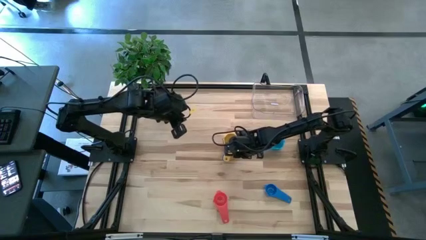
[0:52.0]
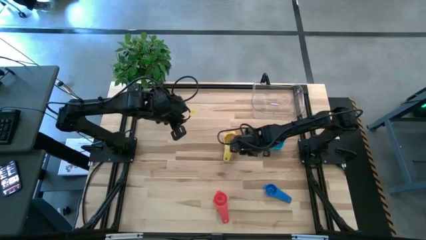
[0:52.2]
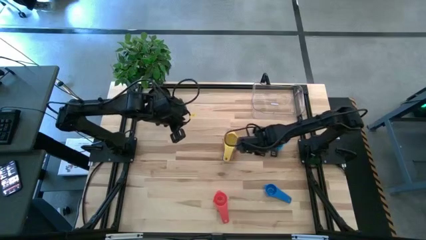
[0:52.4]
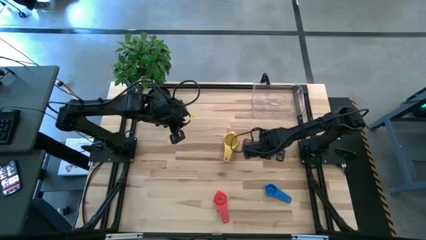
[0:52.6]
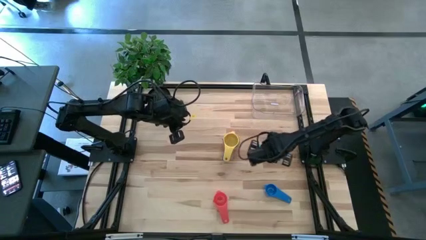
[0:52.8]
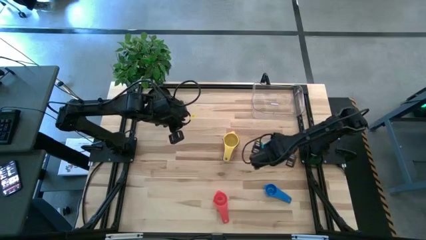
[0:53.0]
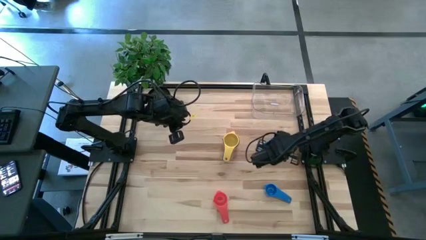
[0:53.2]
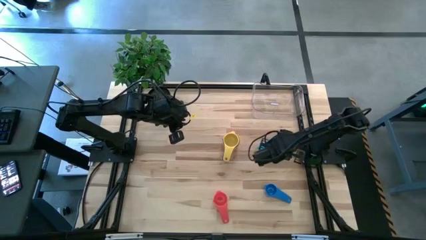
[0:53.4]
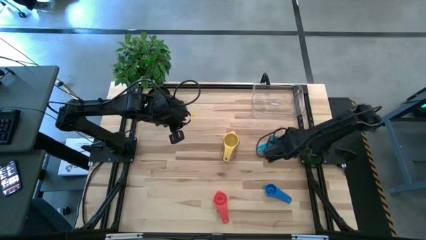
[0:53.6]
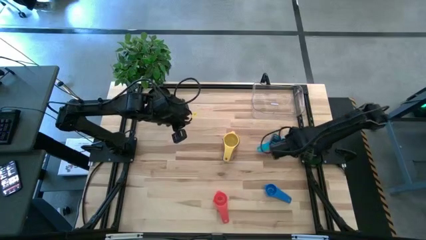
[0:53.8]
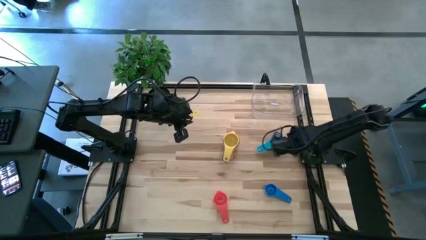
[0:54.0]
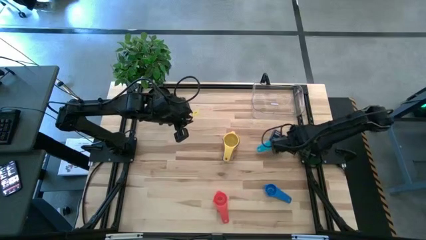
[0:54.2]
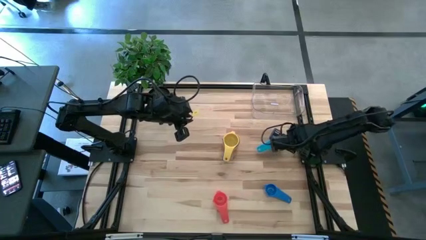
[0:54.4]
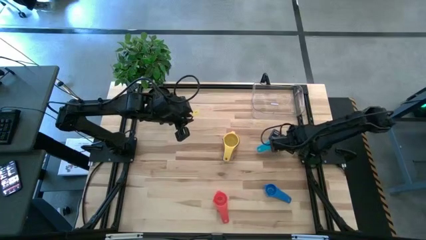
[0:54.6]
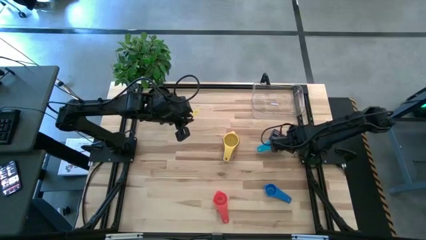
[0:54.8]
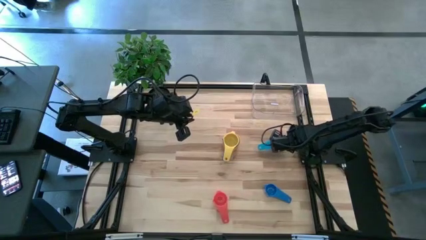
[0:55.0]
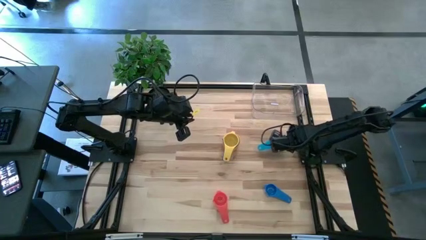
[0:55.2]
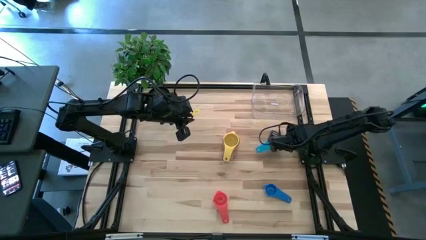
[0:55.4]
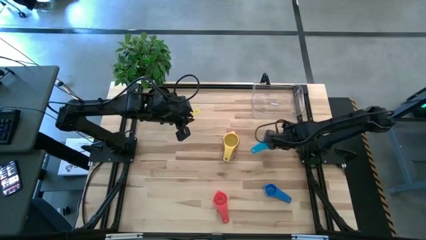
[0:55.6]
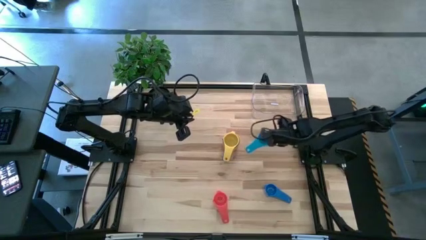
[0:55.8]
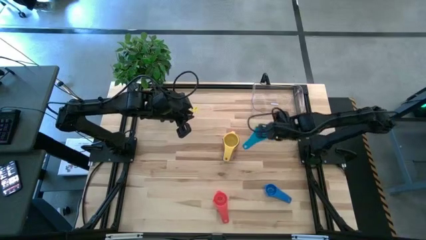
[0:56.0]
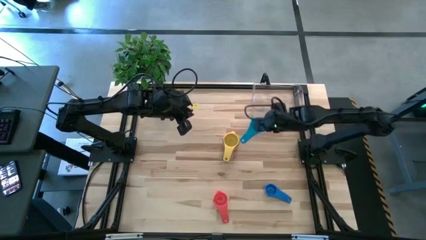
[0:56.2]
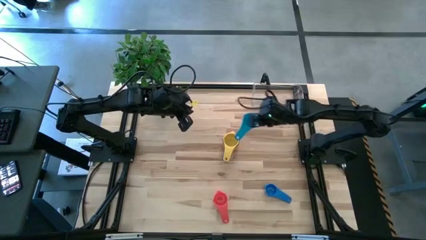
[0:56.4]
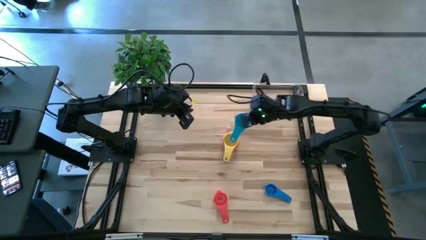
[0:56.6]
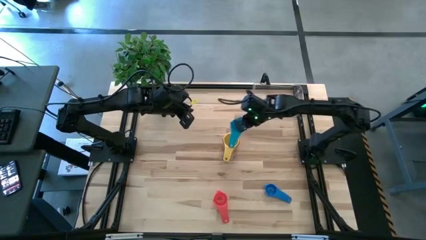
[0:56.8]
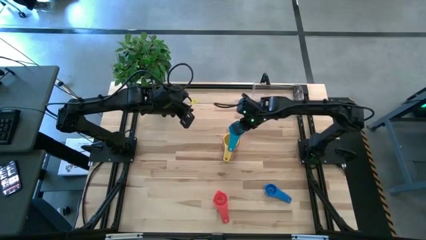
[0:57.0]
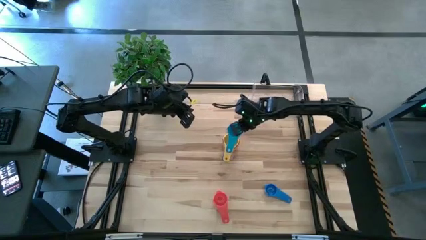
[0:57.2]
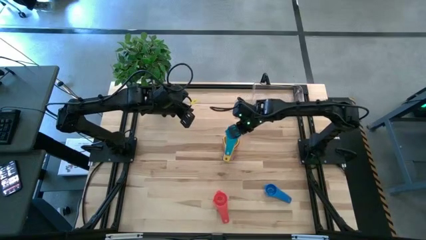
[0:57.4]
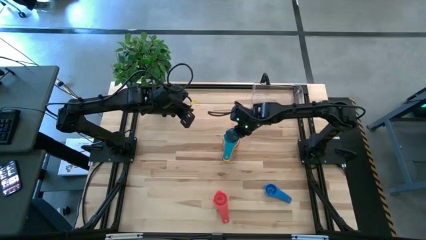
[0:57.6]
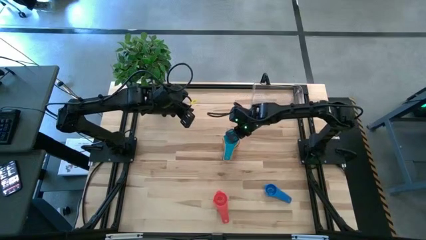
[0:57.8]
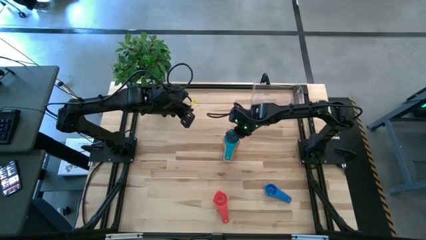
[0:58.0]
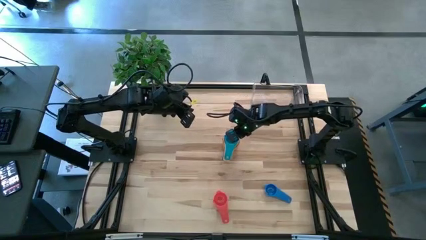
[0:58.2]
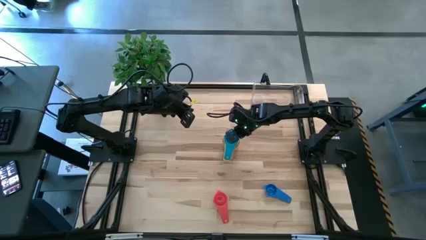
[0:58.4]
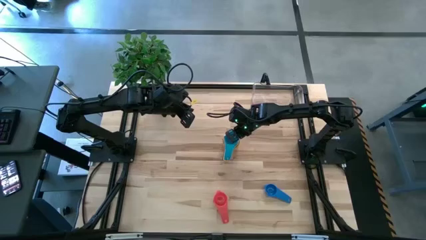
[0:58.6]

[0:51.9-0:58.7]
Task: Nest measuring cups in basket
Stack the light blue measuring cup on the yellow measuring cup

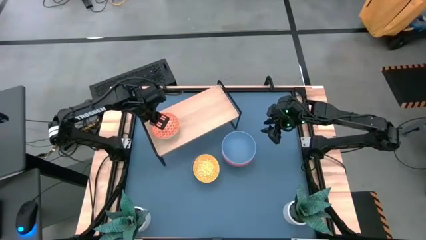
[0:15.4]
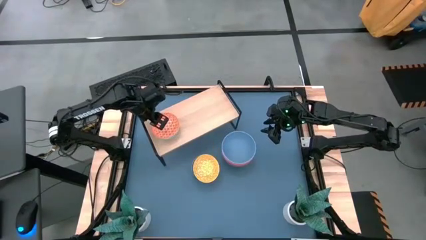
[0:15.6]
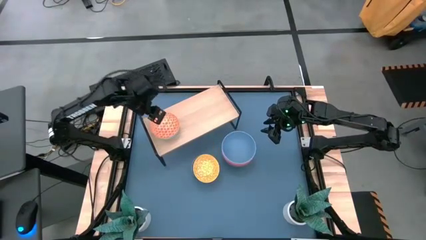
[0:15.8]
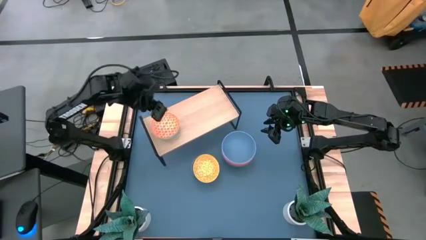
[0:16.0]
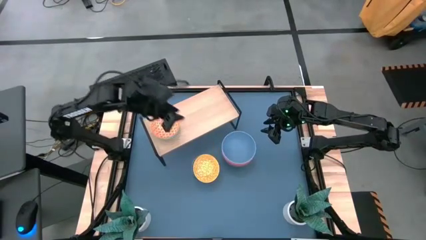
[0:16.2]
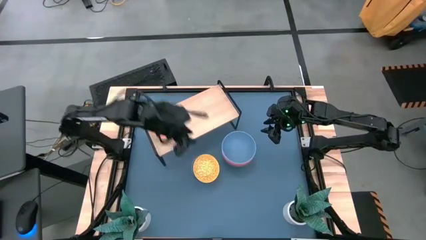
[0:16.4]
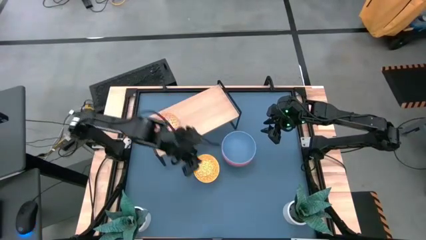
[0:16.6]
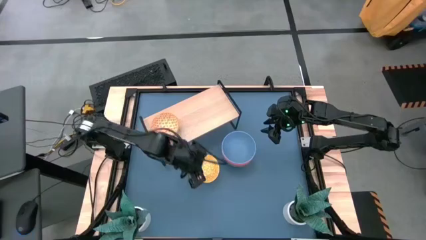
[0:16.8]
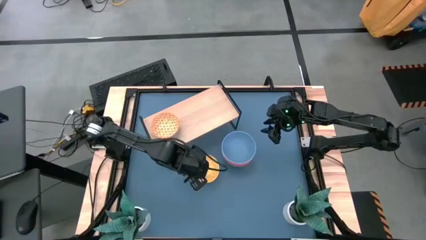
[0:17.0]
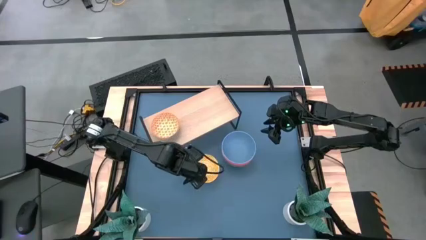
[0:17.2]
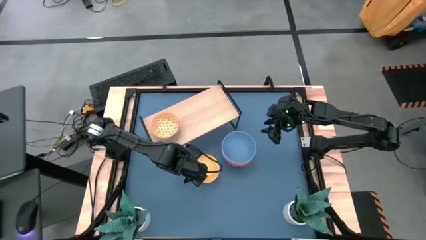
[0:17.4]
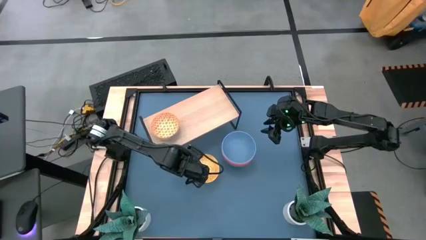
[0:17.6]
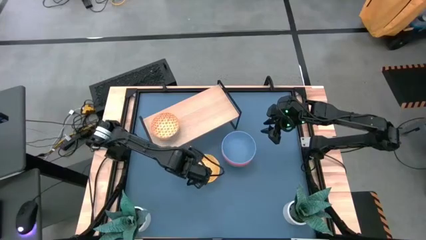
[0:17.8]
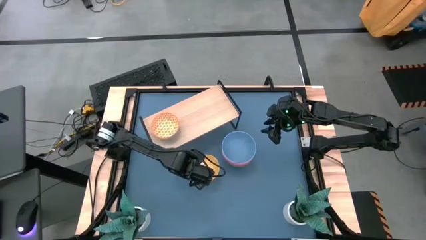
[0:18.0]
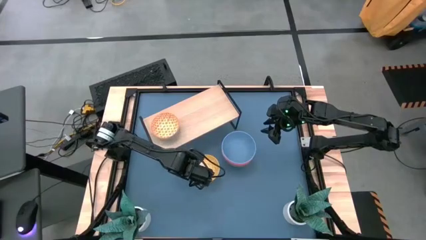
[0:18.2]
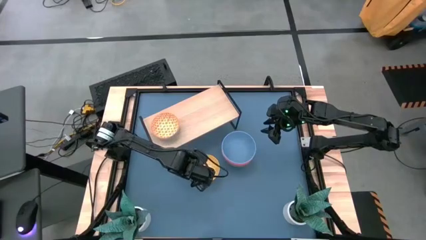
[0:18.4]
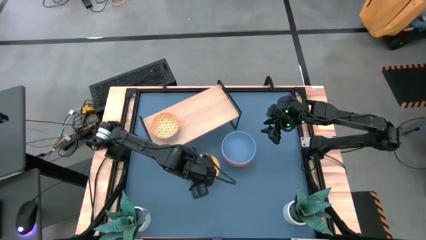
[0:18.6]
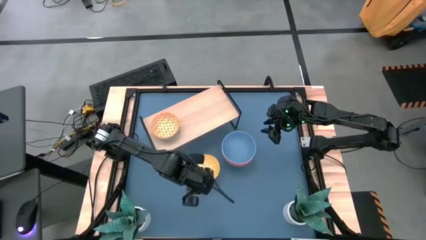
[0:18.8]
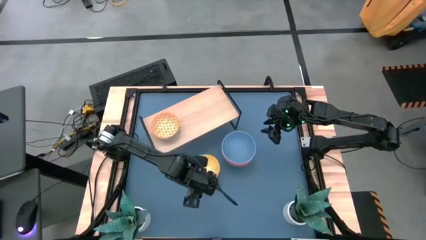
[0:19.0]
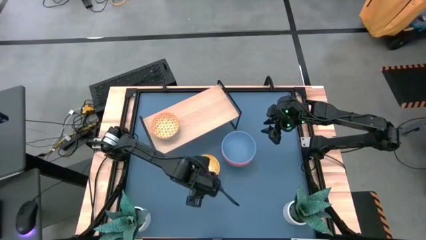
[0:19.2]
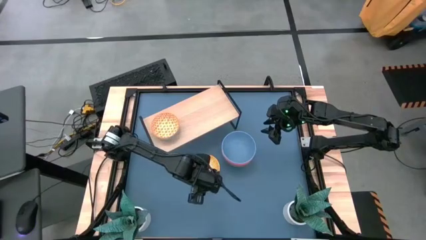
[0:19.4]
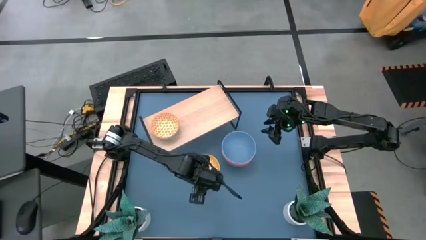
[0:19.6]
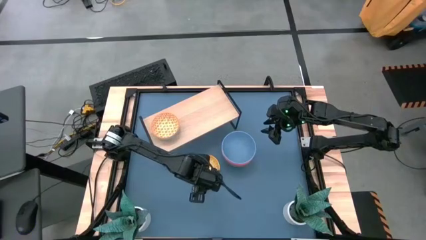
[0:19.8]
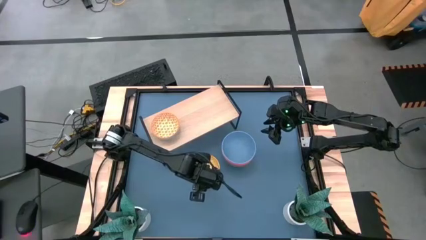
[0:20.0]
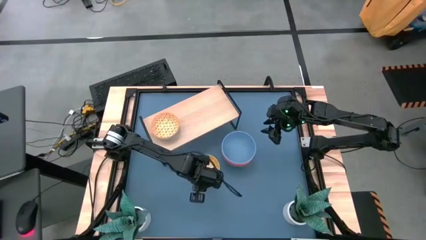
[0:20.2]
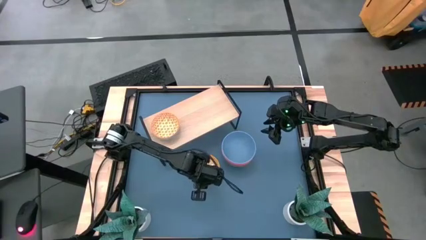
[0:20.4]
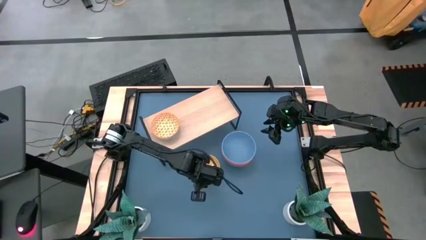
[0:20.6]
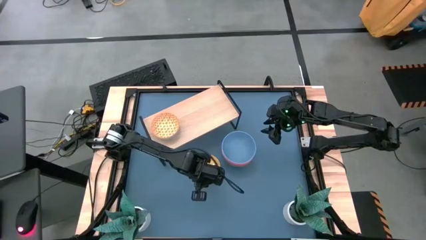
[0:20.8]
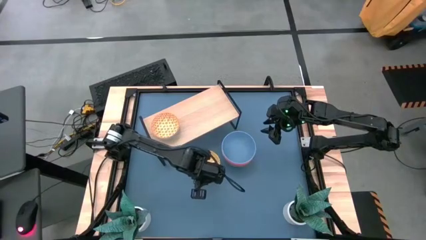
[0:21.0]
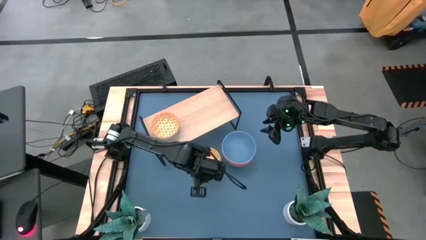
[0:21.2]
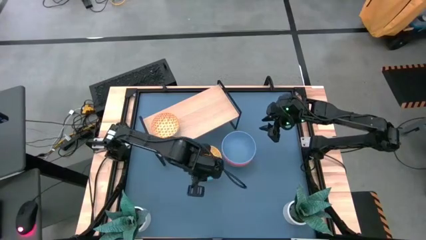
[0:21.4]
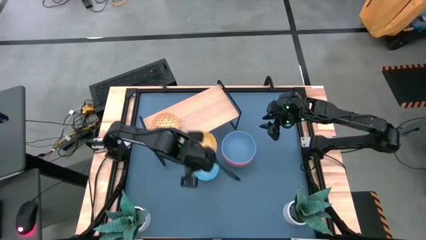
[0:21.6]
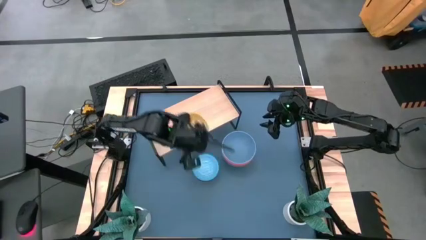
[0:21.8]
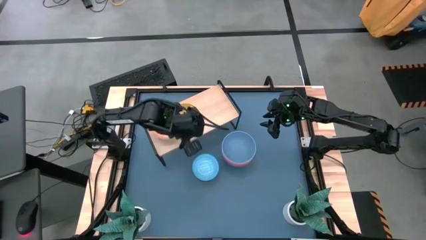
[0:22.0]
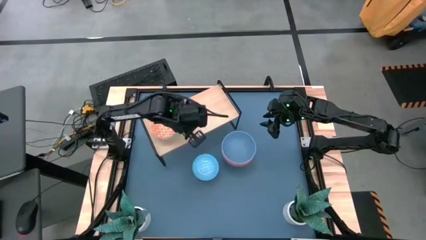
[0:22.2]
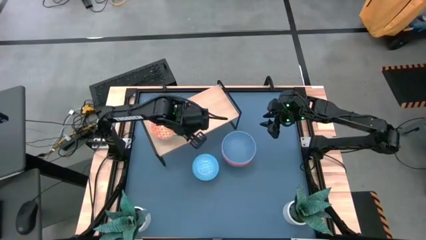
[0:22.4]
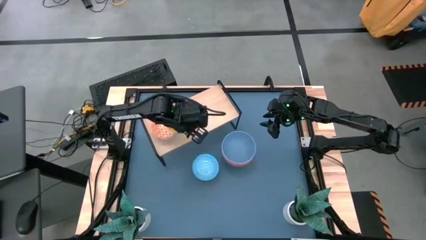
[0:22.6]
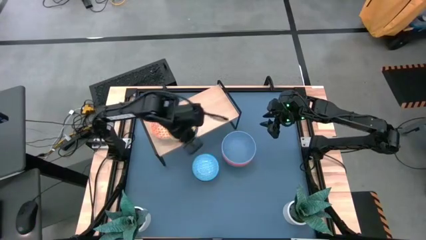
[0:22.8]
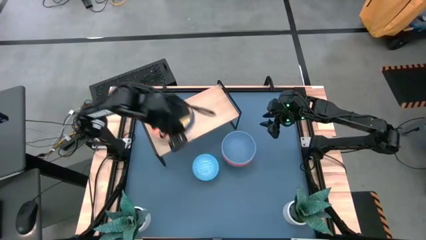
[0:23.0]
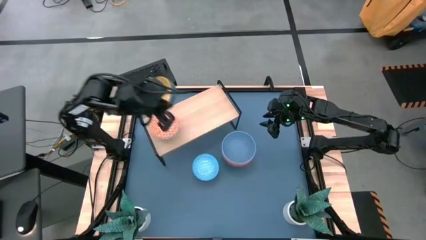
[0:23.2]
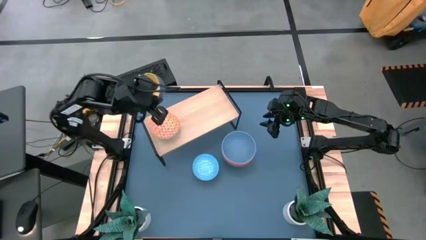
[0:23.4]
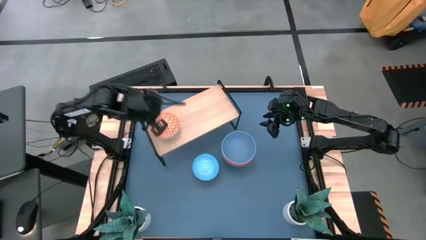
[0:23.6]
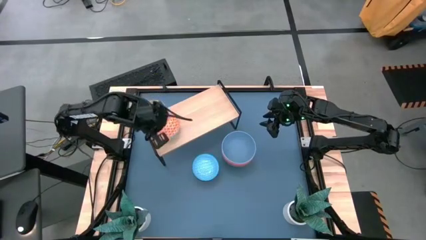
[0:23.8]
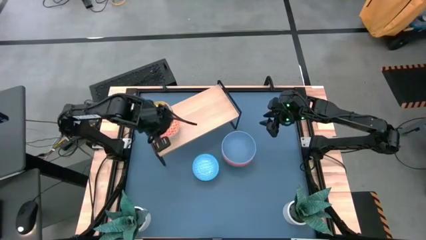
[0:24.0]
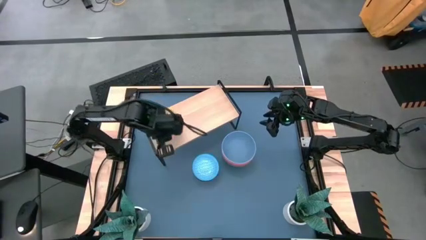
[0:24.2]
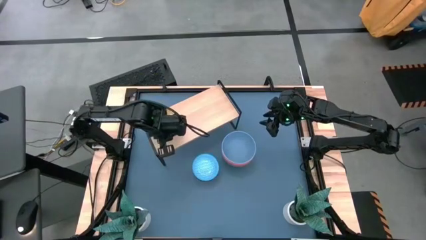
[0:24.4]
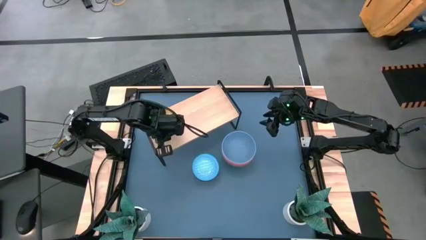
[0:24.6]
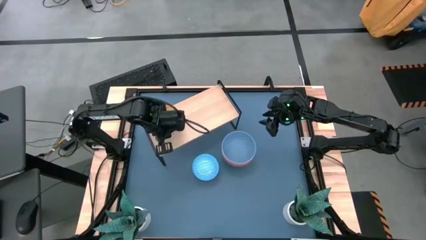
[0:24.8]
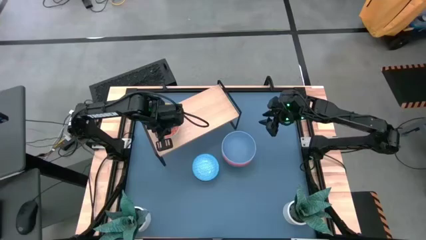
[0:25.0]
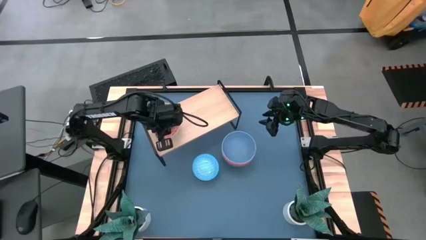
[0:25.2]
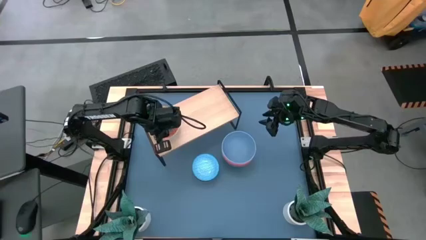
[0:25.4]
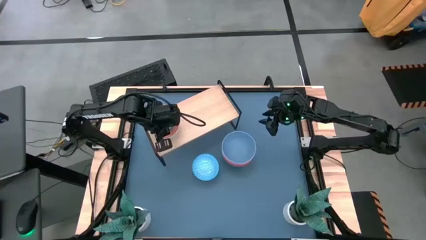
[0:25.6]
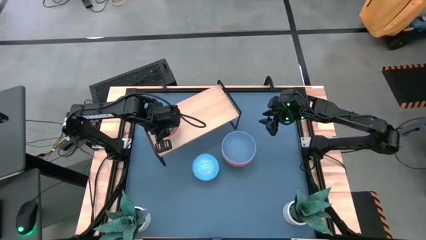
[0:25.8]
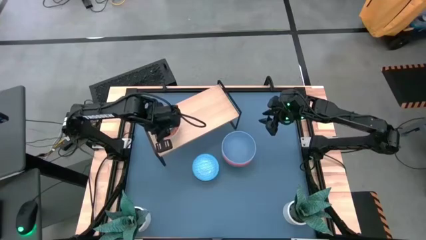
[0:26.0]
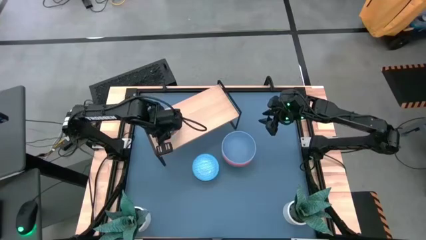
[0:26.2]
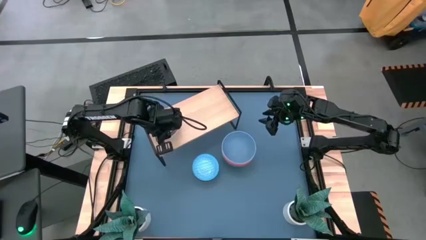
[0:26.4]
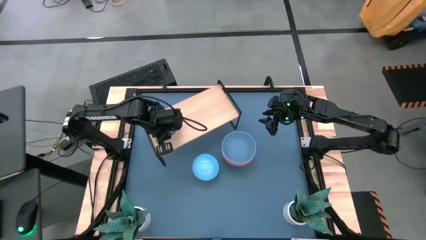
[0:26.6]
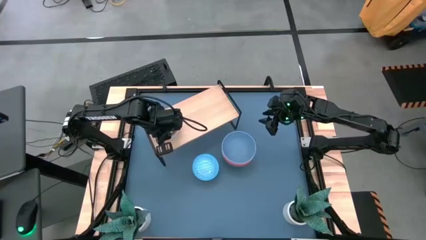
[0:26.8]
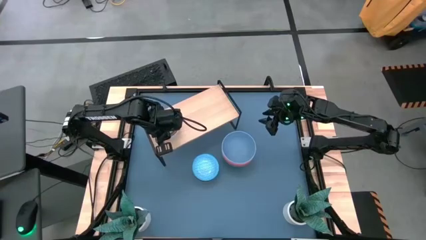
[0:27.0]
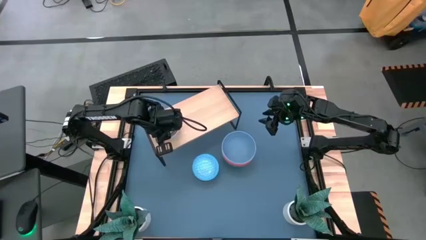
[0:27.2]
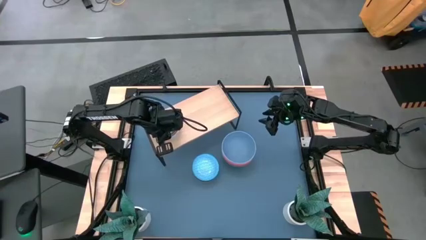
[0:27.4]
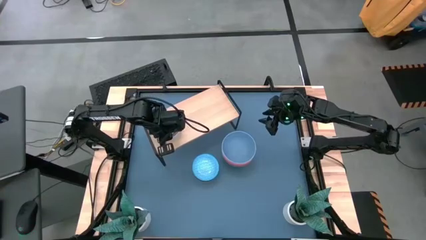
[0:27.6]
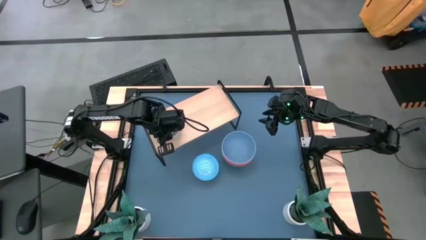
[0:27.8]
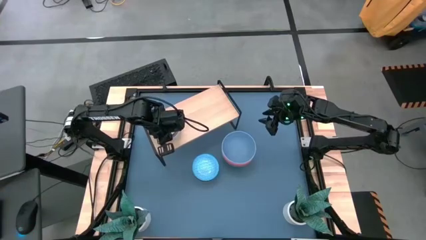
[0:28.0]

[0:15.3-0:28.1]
Task: Place and stack bowls onto a shelf
Stack the yellow bowl on top of the small orange bowl on the shelf
